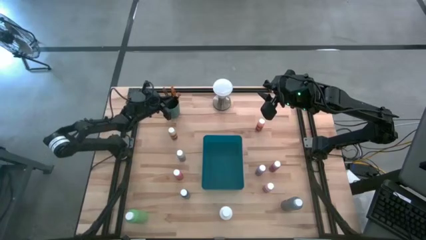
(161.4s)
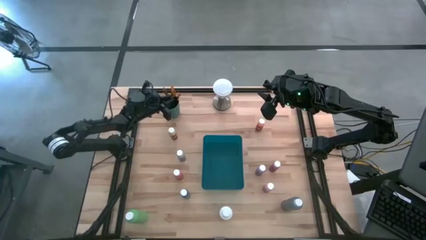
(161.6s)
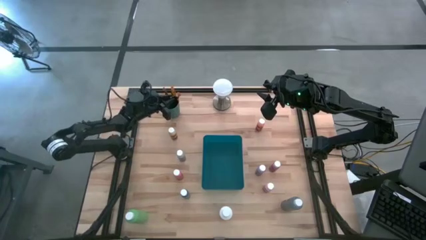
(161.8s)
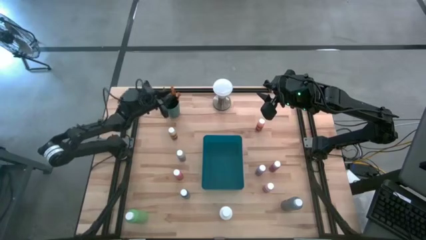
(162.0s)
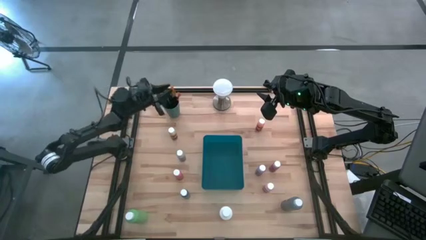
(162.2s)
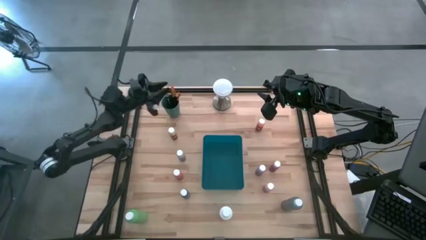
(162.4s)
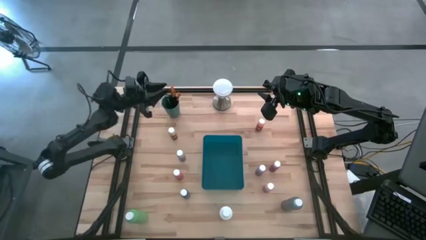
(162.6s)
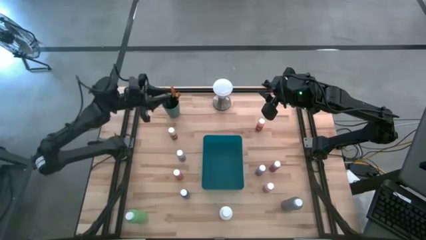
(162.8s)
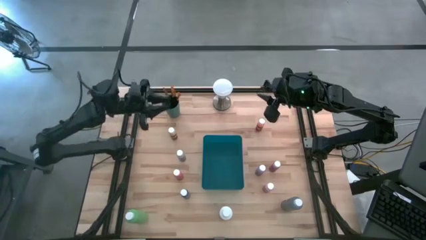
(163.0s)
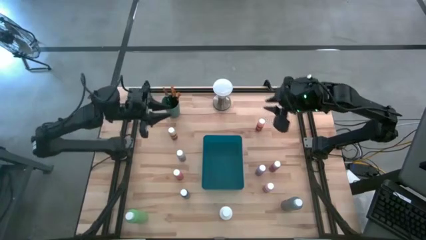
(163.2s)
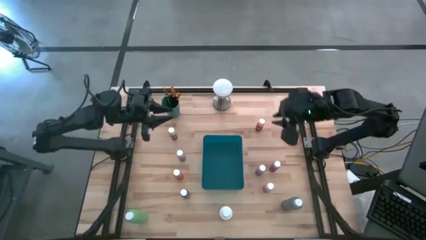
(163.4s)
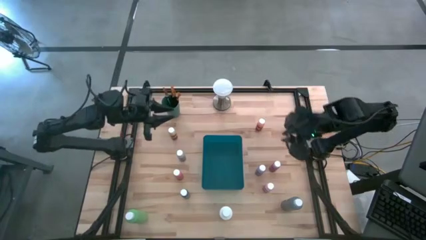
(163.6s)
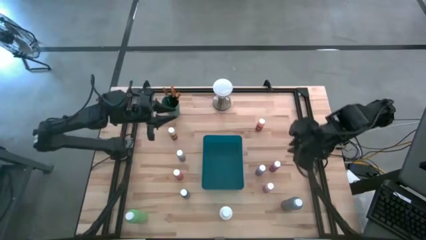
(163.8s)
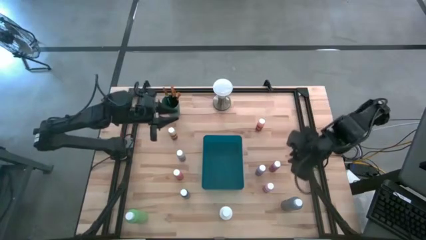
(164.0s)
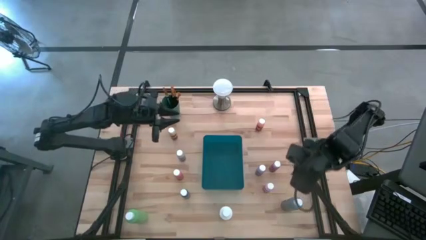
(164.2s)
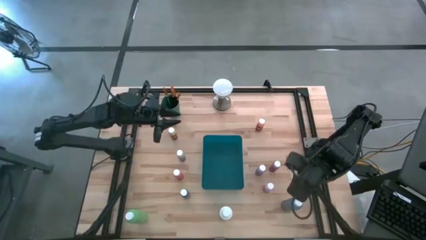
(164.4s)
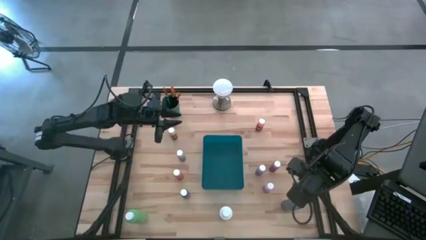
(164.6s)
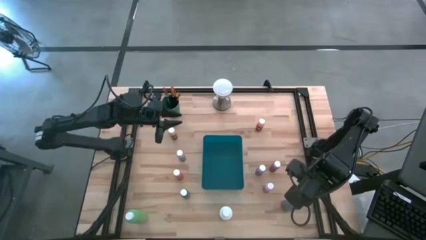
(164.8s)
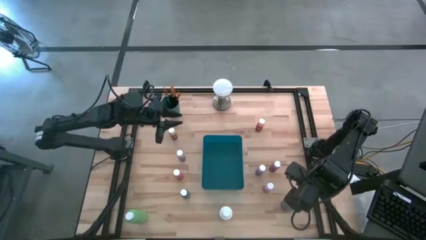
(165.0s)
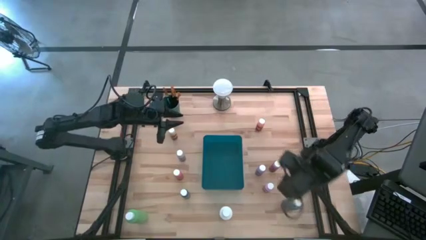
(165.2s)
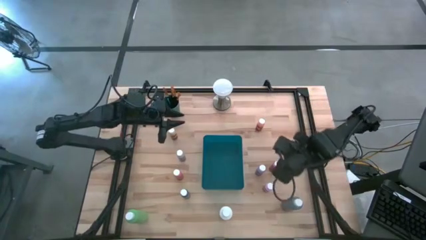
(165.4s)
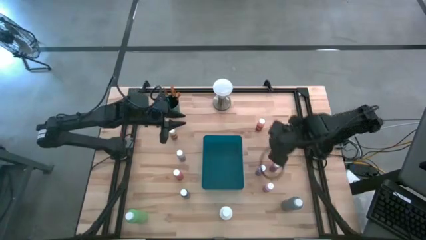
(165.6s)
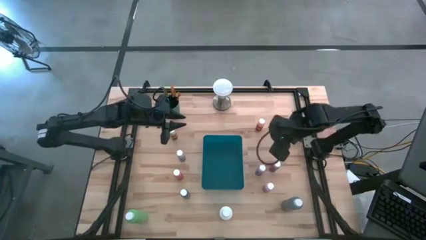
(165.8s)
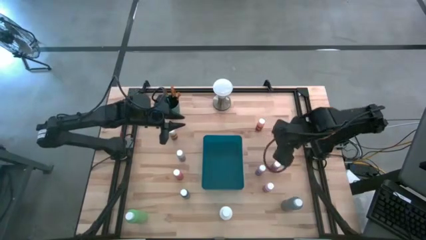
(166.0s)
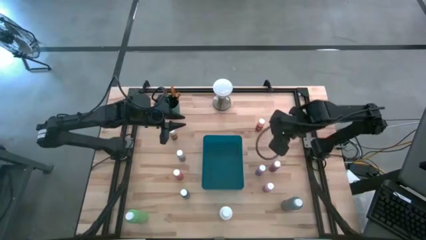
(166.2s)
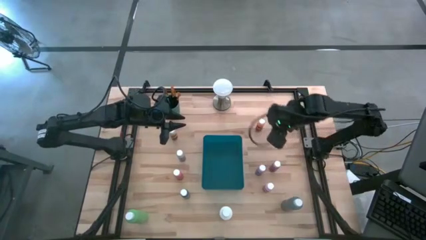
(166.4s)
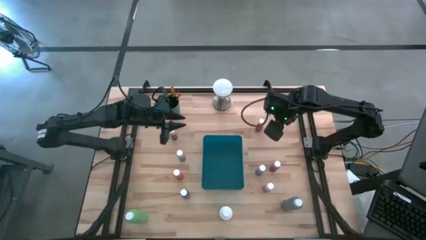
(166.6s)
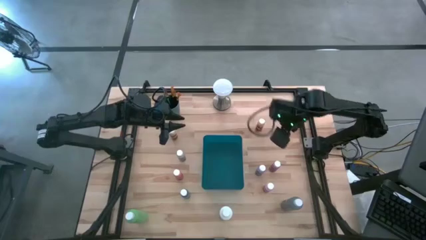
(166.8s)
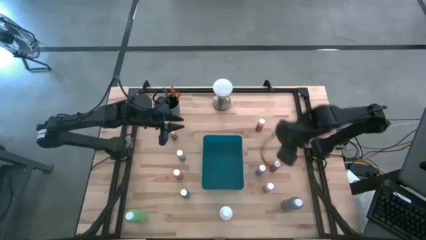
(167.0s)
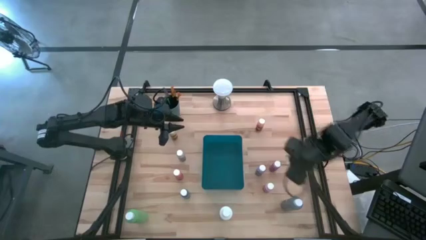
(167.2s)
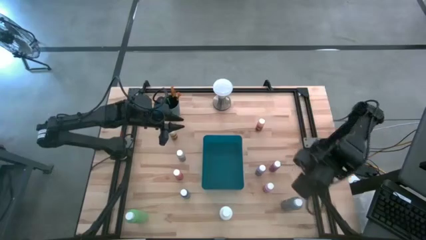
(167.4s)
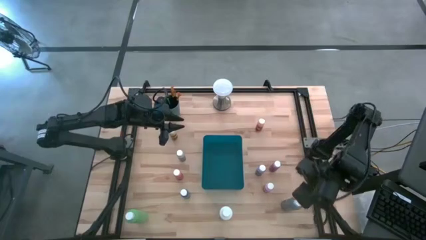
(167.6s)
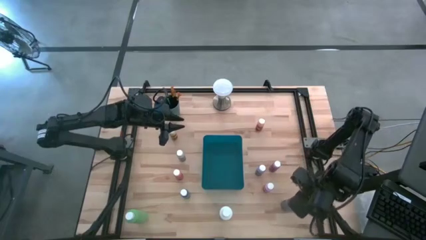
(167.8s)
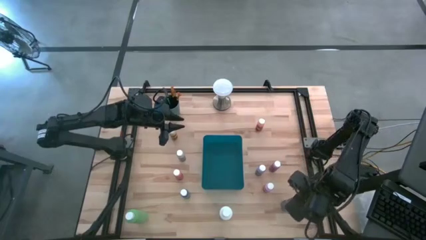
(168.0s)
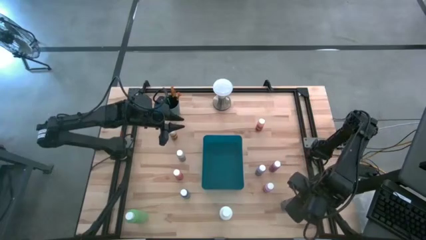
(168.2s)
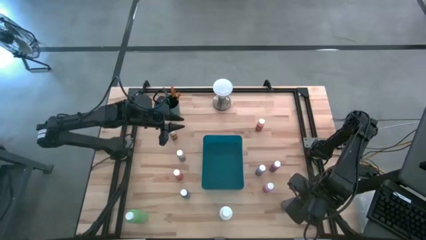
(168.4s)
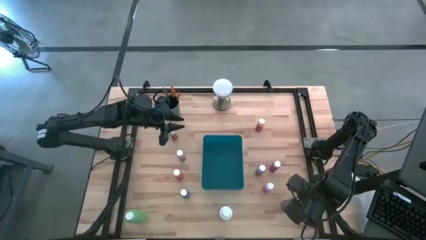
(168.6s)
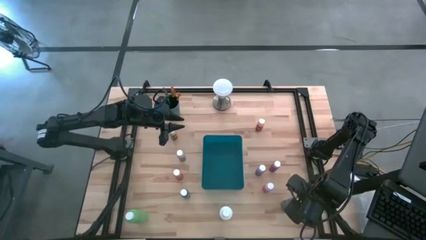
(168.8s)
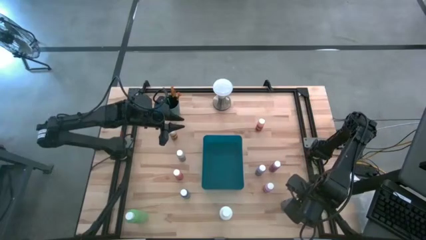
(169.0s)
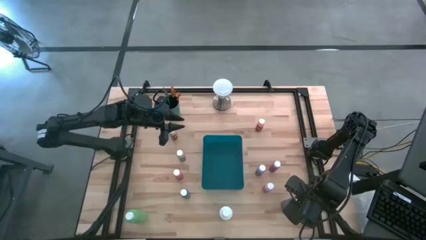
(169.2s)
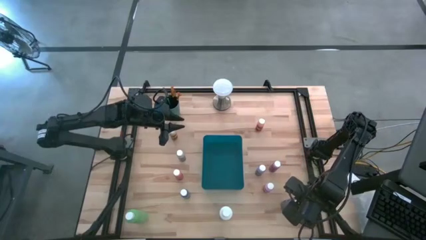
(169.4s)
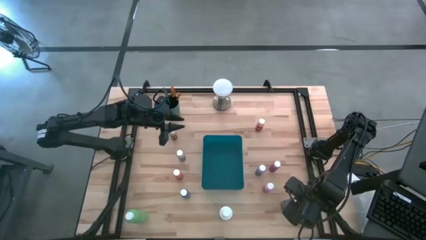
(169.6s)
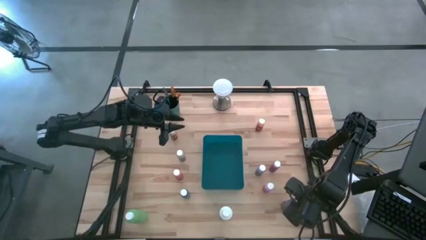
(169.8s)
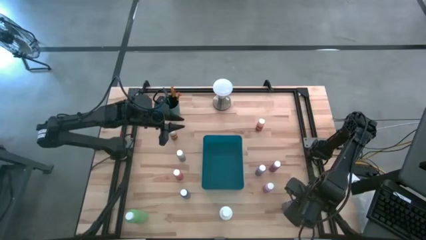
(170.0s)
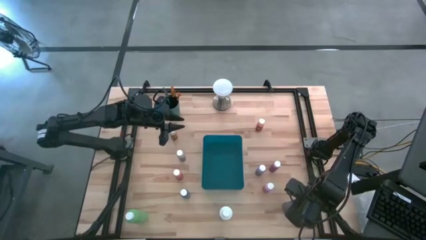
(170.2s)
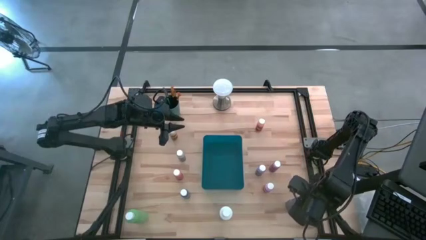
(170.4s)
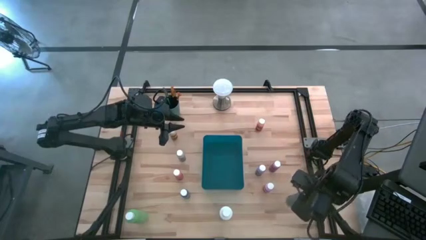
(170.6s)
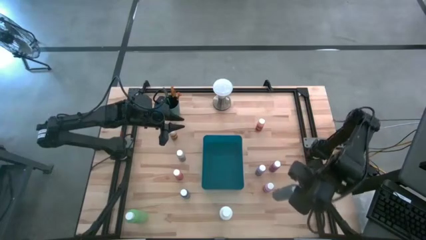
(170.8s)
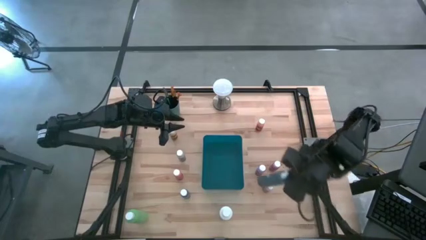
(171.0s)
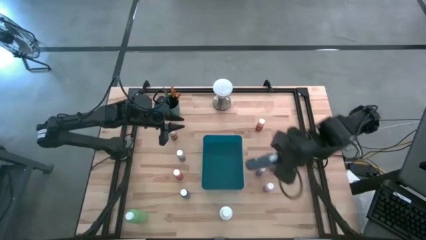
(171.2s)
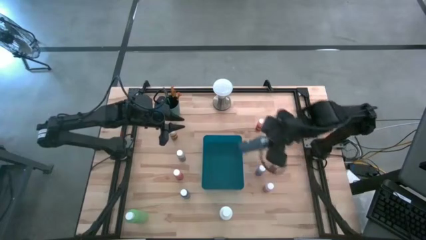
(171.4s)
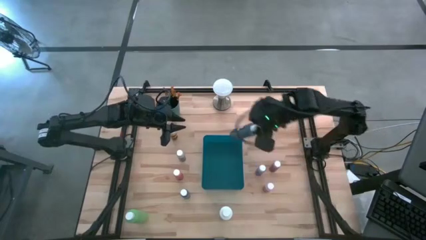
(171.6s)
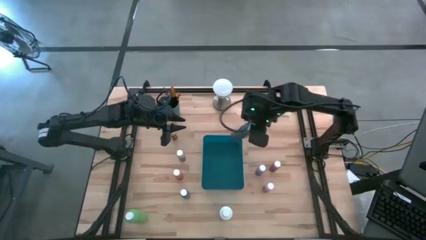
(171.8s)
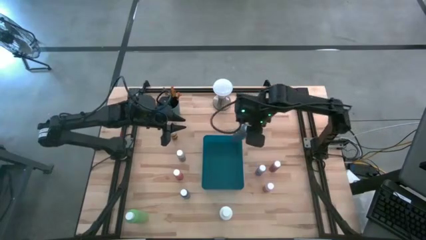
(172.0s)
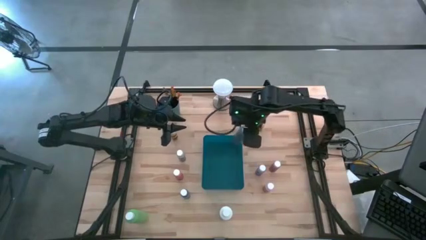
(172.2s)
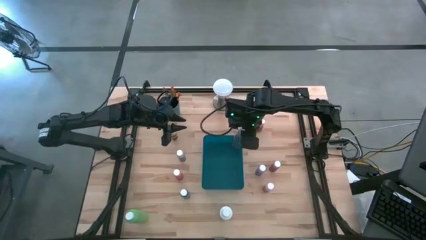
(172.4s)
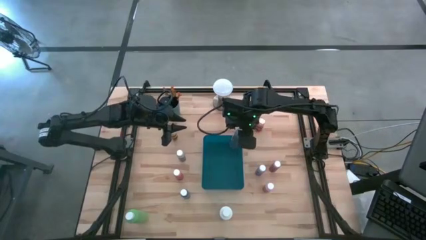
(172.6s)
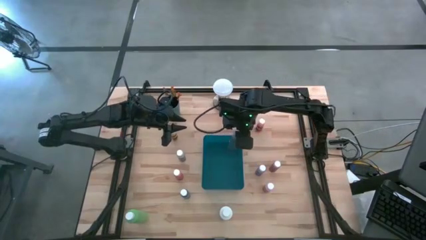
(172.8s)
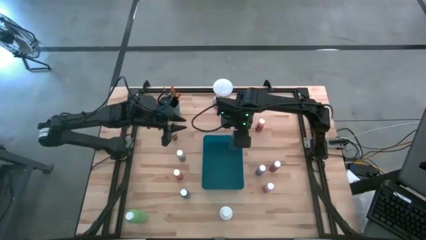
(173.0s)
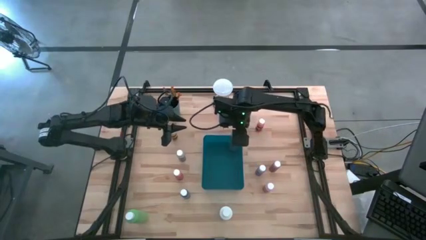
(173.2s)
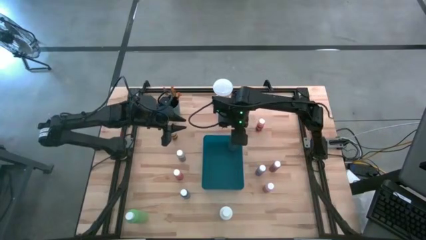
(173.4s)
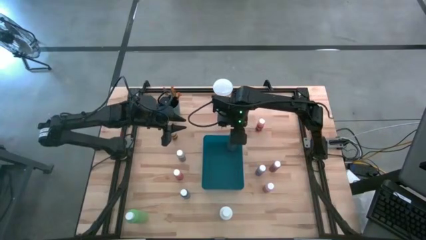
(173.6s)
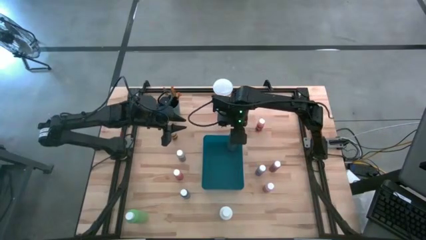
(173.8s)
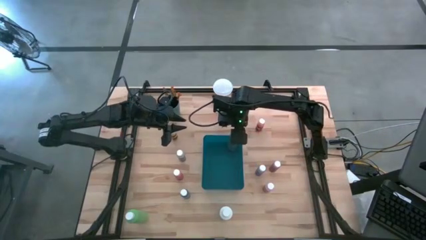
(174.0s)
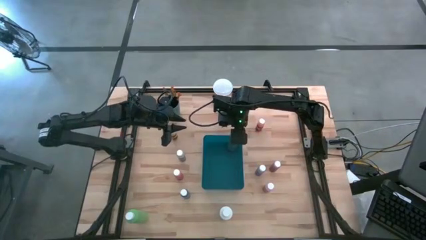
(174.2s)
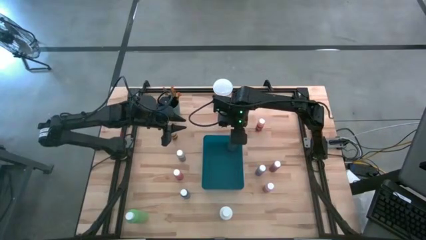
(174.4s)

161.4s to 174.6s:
Task: Pick & Place Paint Supplies
Put the black paint bottle into the blue bin

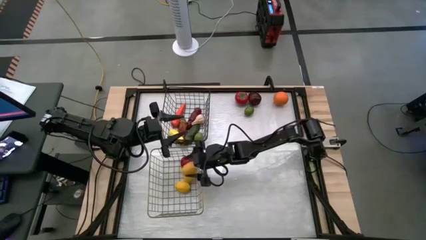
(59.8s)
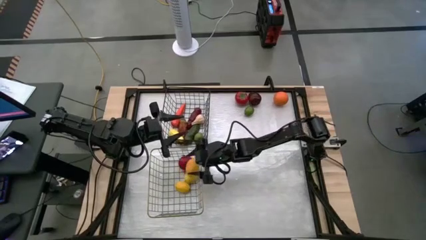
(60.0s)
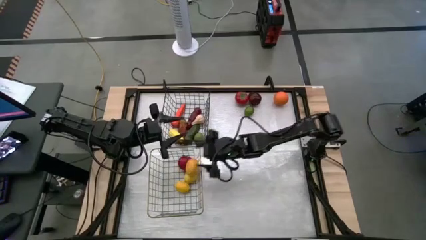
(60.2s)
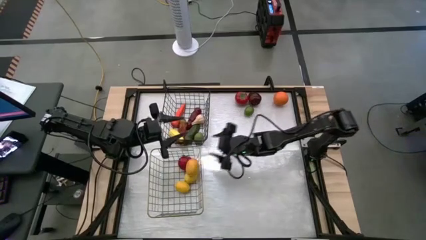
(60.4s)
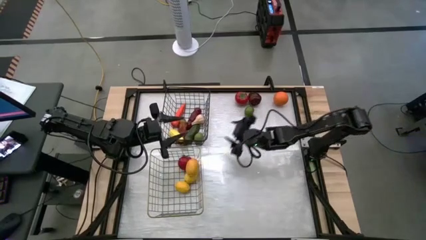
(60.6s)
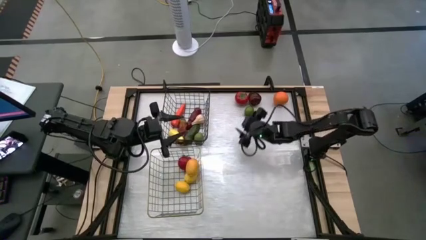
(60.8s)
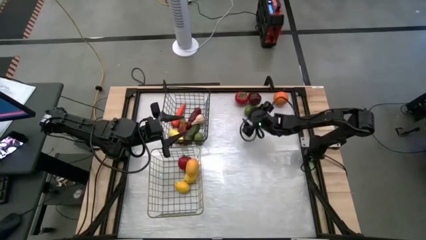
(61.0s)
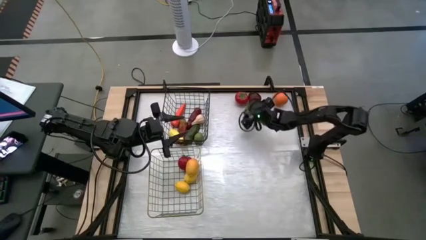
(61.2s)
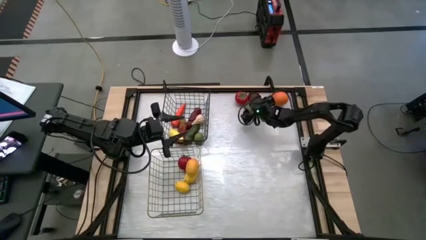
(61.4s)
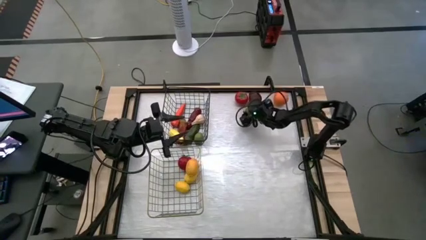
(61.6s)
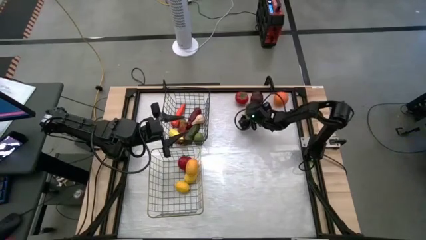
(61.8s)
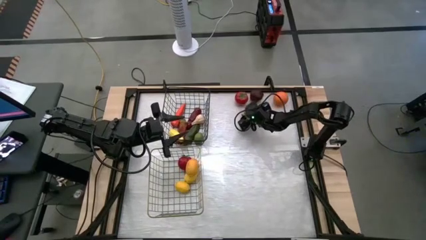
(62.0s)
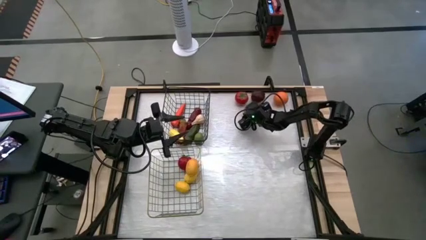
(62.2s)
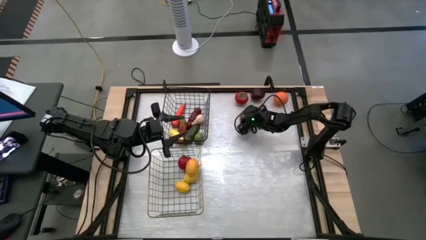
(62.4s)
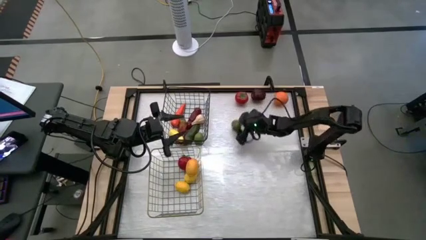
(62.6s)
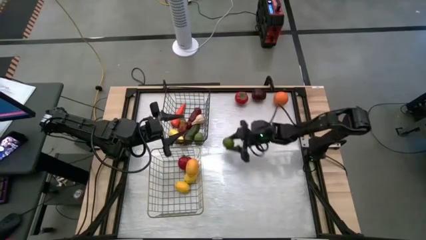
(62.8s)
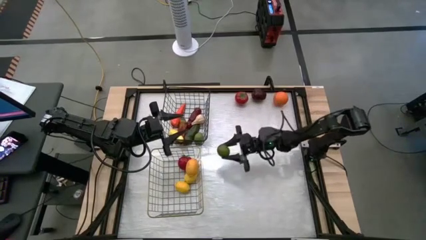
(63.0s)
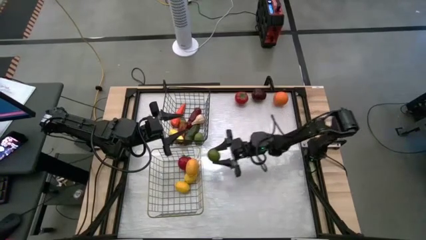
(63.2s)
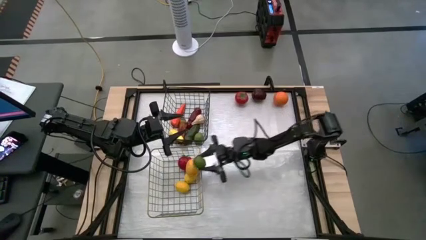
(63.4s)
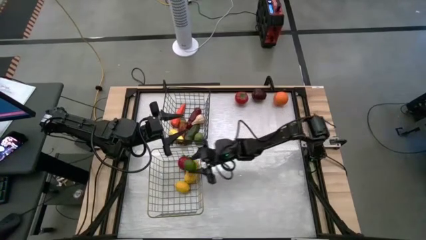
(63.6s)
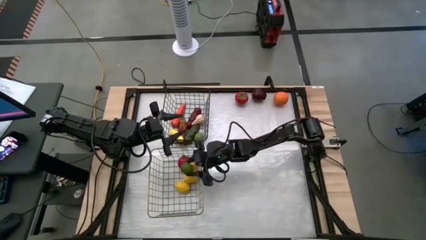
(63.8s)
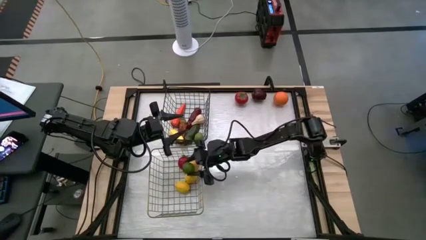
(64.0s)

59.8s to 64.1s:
Task: Sort produce into baskets
Put the green lime into the gold wire basket
